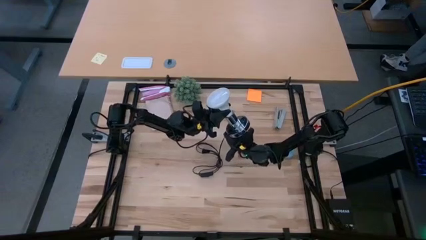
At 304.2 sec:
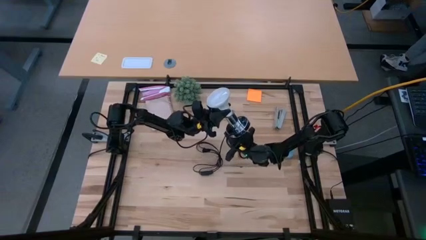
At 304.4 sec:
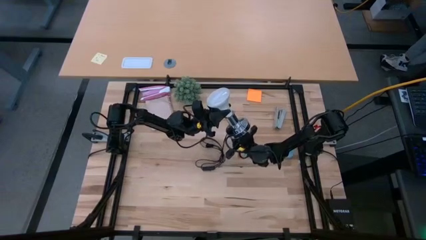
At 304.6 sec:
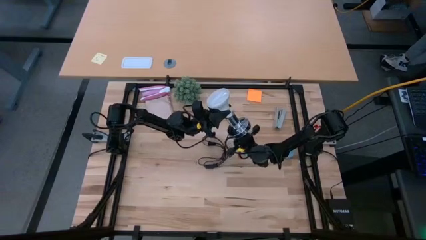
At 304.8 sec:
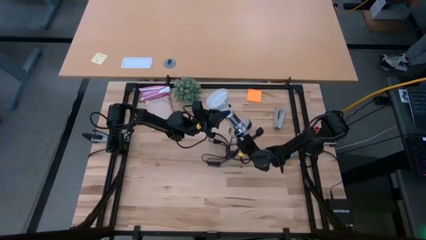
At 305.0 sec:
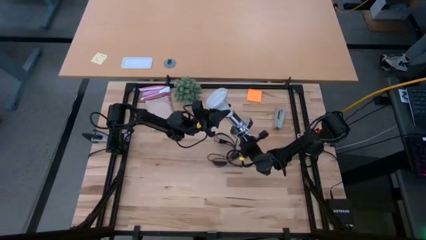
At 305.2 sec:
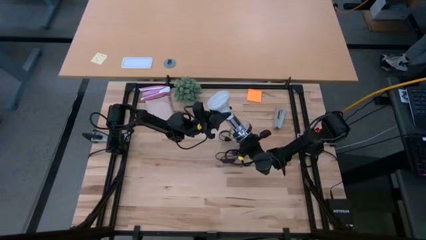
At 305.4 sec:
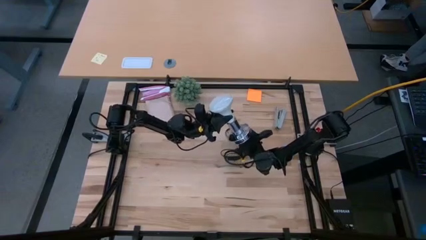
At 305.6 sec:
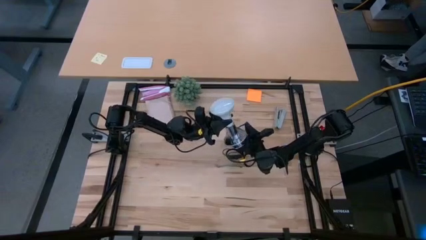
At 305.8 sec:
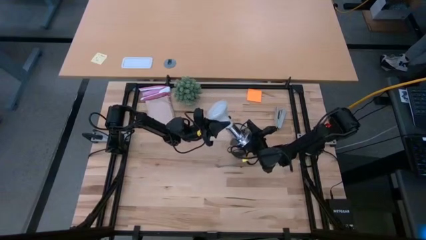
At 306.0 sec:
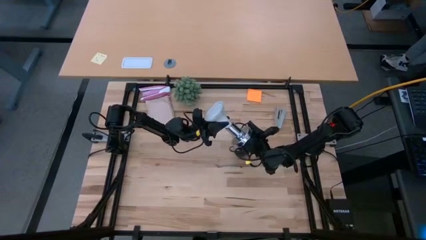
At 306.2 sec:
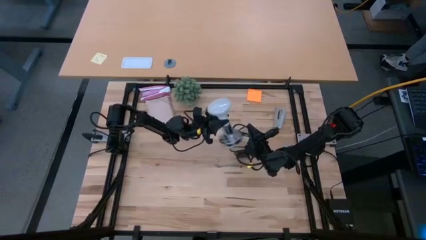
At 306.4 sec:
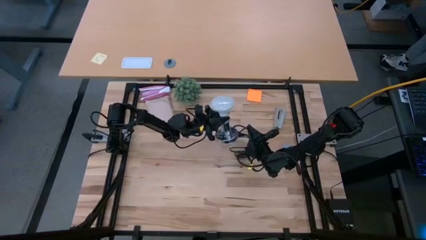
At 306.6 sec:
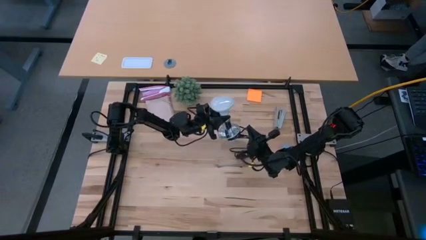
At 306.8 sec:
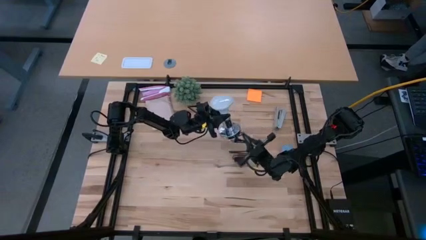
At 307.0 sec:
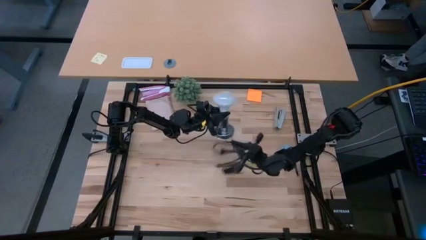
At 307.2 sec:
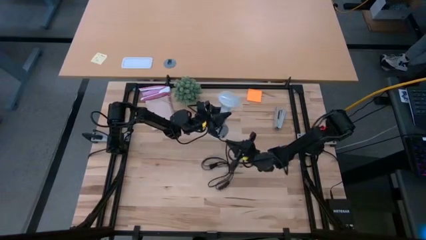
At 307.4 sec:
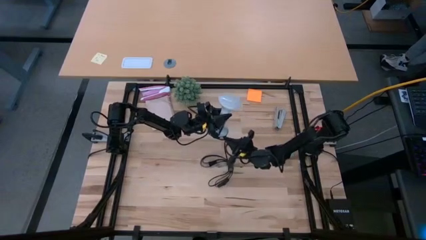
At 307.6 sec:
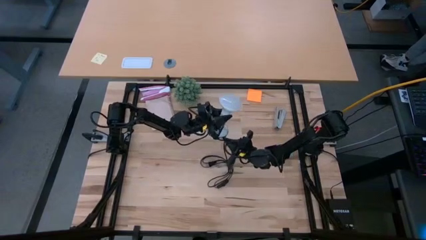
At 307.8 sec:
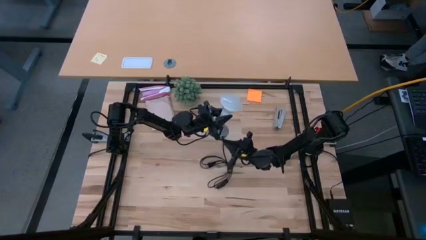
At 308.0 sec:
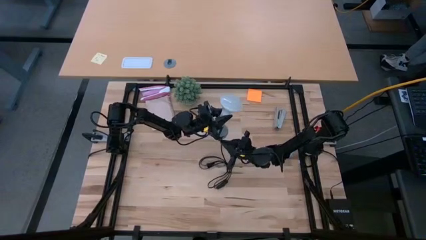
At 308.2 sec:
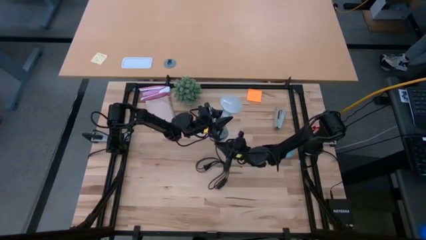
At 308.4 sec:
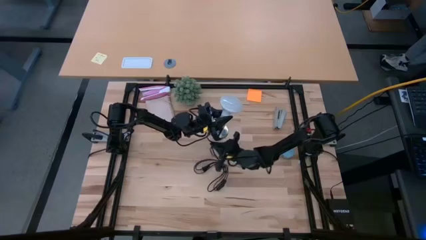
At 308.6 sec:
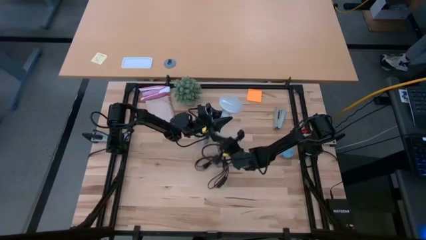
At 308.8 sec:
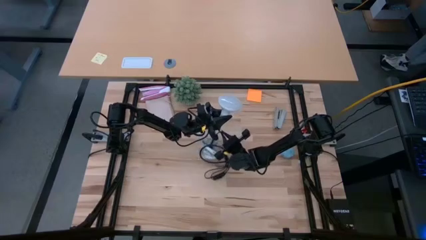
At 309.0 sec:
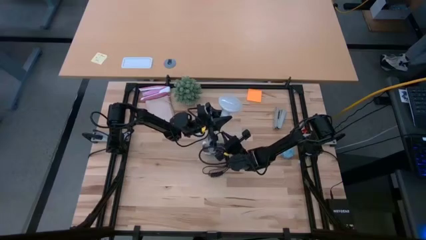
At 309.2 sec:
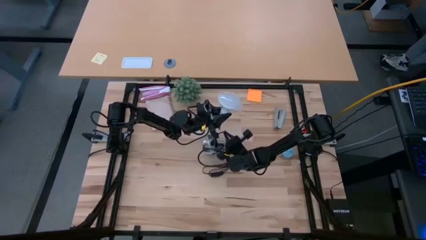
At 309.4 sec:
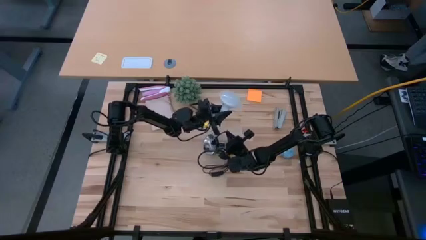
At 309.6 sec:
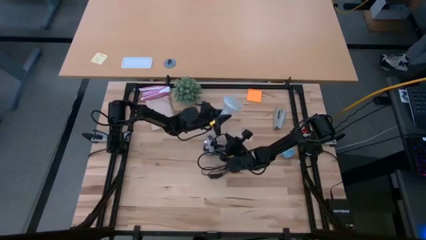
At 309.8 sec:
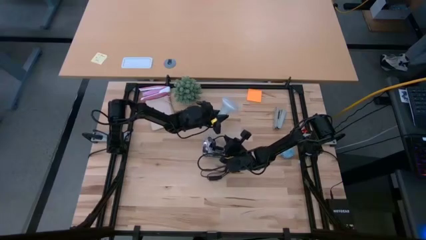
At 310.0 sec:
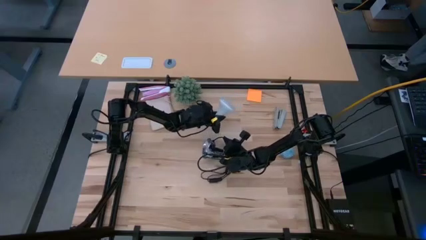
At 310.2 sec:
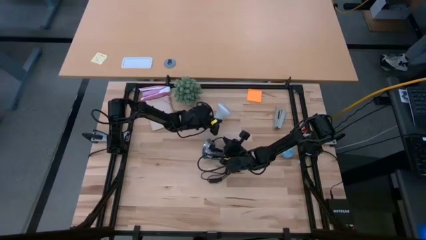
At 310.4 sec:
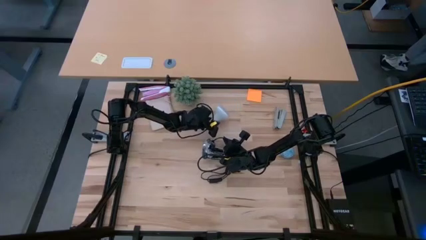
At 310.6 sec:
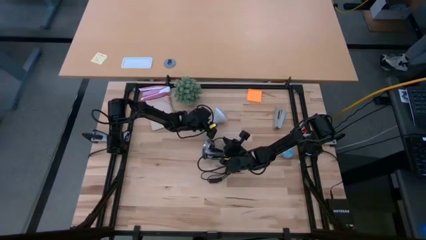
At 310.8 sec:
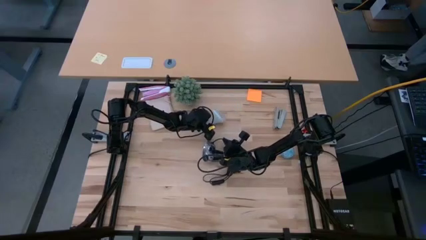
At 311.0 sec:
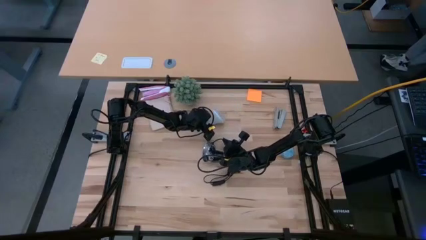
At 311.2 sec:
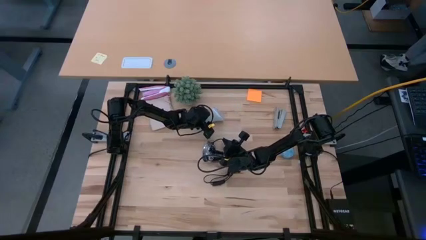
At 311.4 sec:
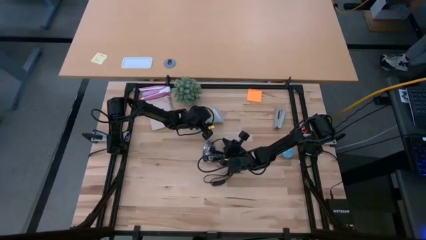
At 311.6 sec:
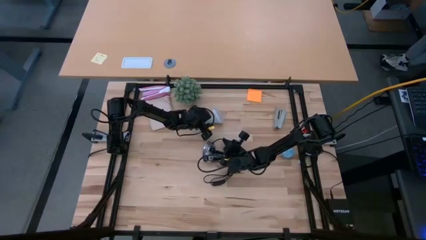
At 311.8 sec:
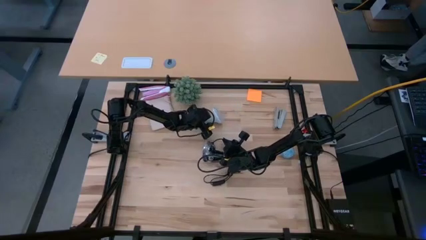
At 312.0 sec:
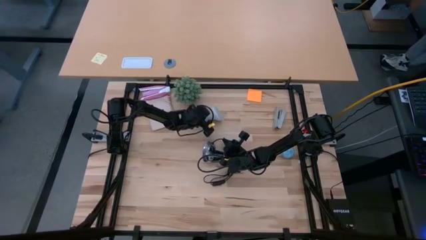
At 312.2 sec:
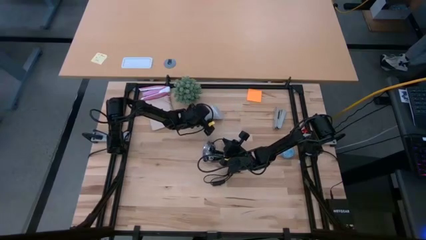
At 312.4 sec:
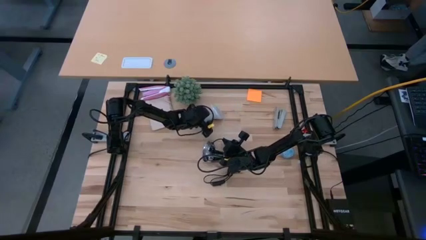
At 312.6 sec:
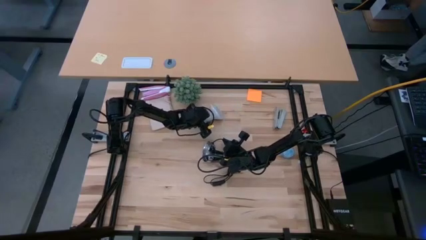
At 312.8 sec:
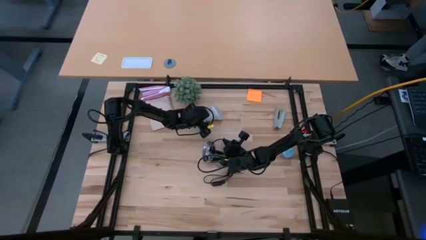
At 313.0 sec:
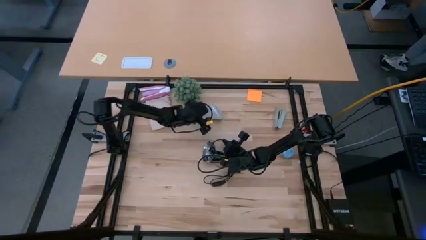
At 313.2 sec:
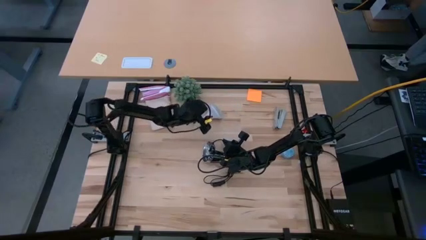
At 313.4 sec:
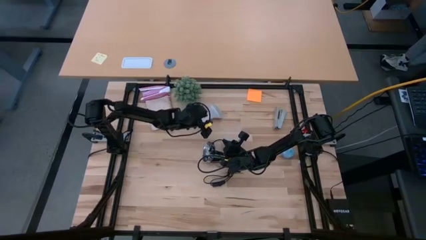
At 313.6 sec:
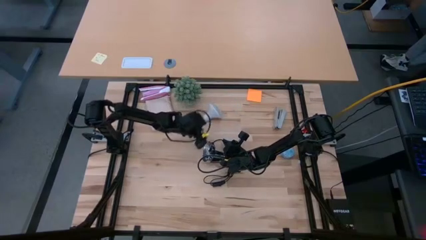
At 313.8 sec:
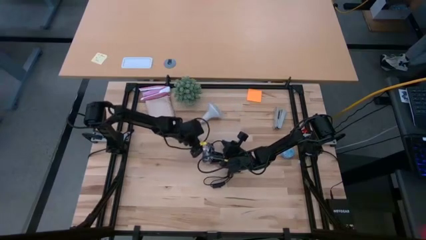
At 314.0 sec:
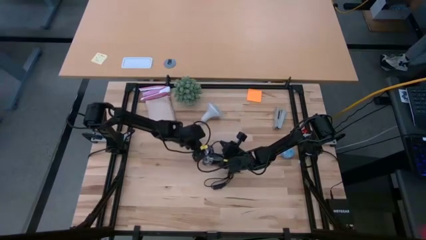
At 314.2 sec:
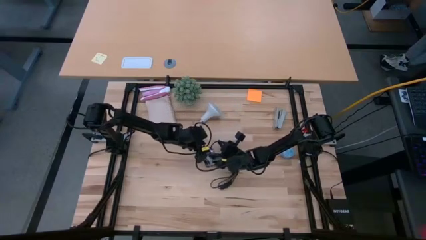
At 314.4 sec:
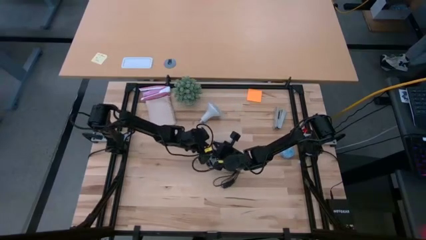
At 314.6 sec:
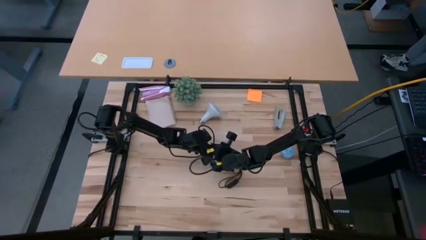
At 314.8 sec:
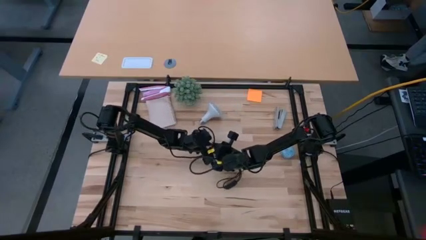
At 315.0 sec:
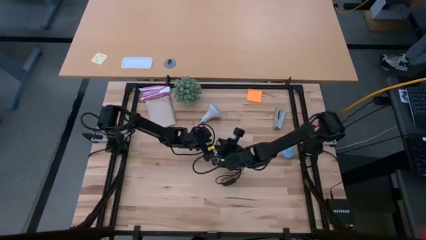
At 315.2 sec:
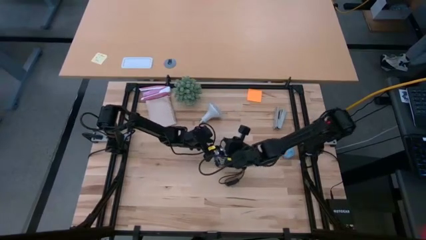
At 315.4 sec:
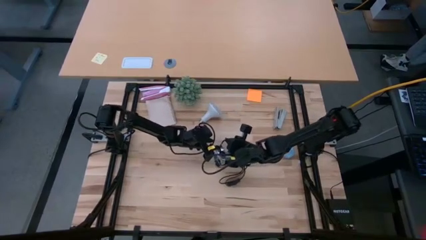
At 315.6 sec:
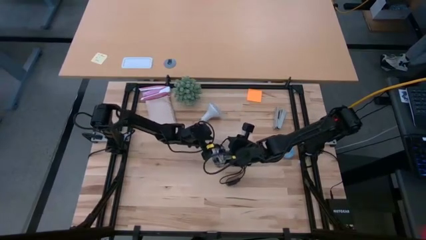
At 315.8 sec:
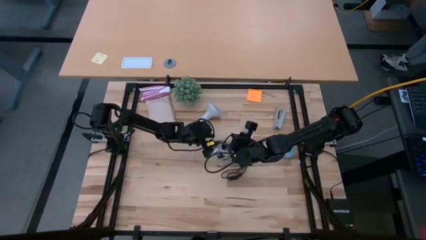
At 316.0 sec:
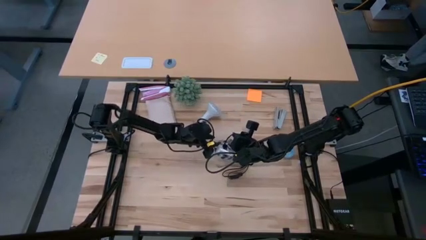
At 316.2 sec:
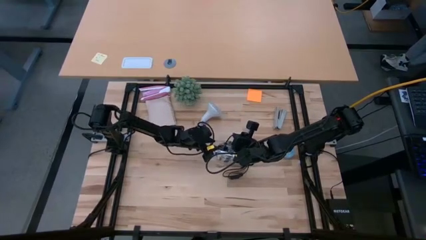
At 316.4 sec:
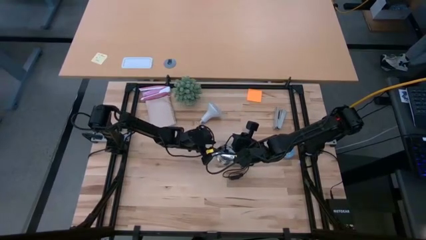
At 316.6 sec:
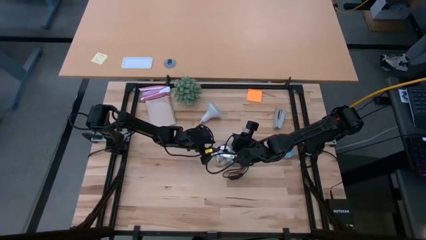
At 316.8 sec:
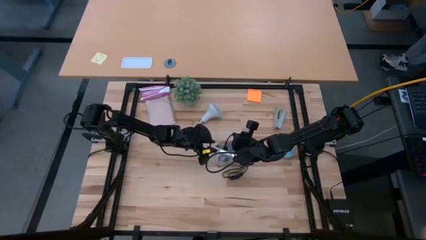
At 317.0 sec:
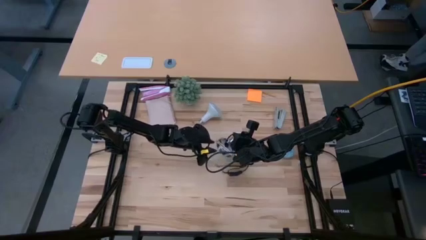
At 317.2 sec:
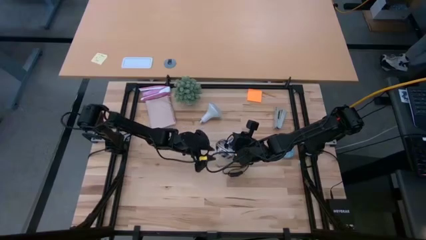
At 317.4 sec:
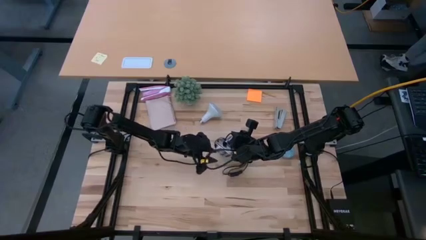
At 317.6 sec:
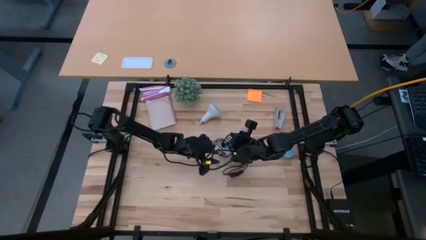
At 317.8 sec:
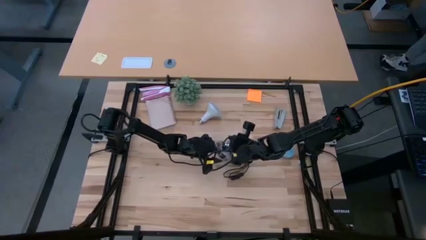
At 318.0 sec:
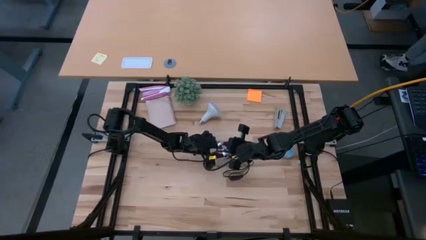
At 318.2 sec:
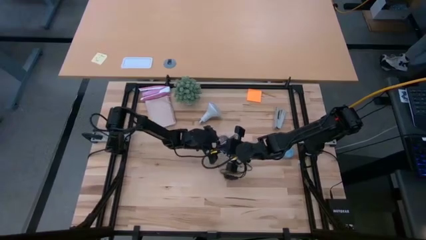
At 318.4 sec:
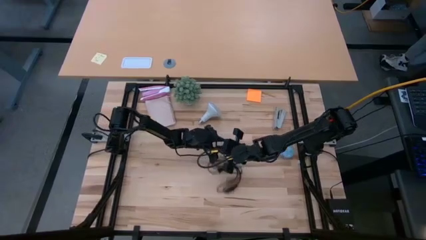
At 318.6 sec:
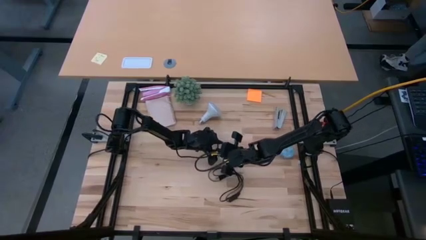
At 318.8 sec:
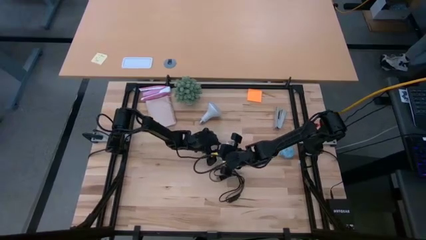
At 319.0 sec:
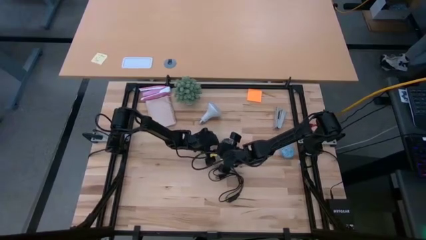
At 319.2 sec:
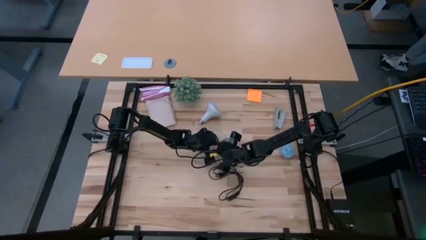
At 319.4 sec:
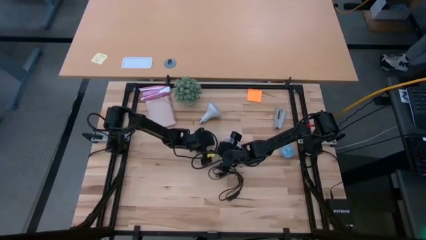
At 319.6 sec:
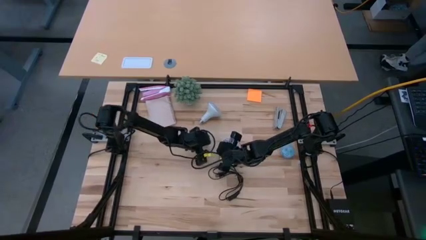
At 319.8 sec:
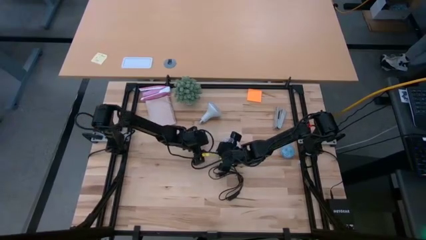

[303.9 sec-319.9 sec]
Task: Screw lightbulb
Remove the lightbulb from the lamp
